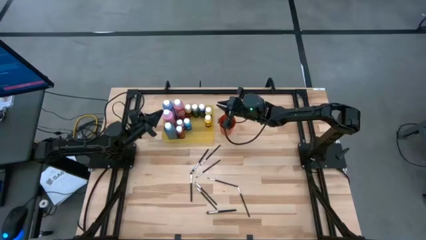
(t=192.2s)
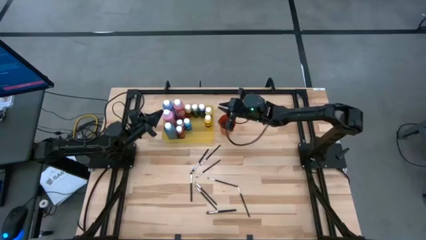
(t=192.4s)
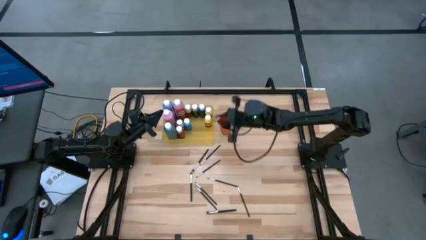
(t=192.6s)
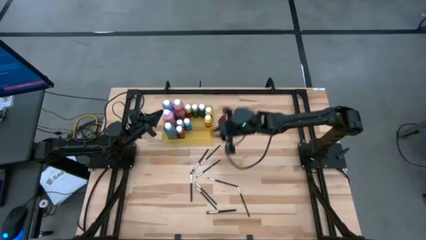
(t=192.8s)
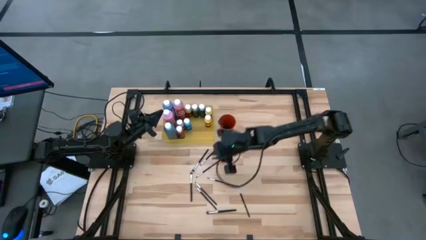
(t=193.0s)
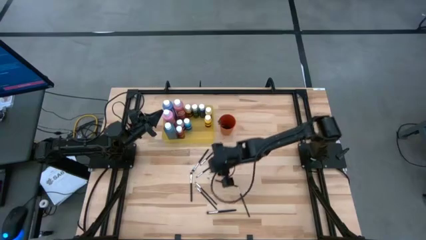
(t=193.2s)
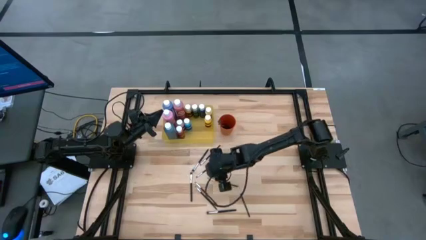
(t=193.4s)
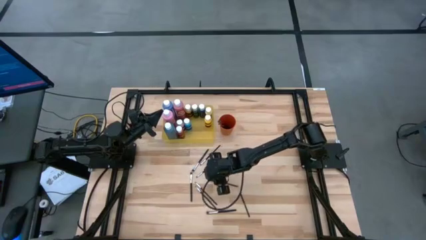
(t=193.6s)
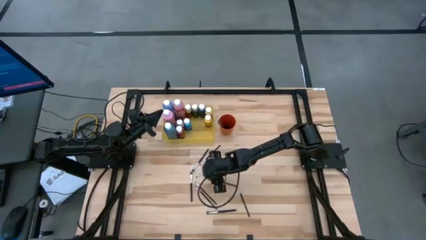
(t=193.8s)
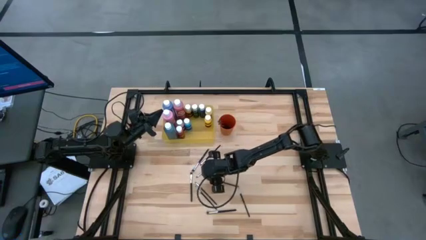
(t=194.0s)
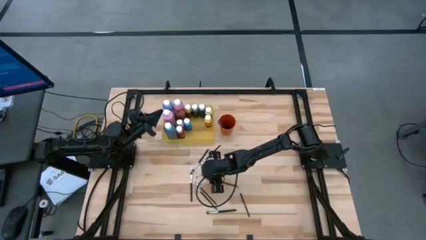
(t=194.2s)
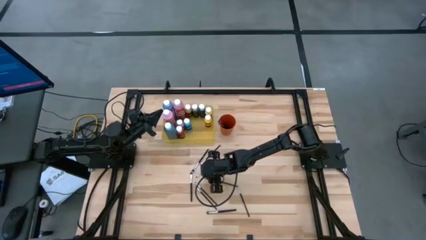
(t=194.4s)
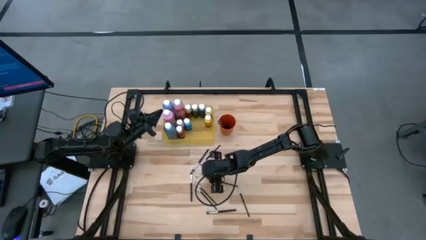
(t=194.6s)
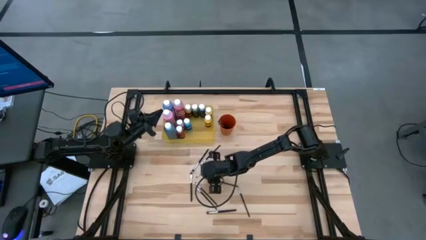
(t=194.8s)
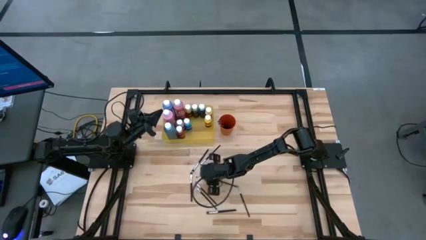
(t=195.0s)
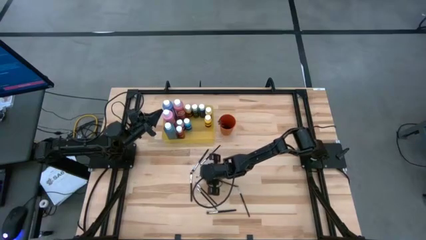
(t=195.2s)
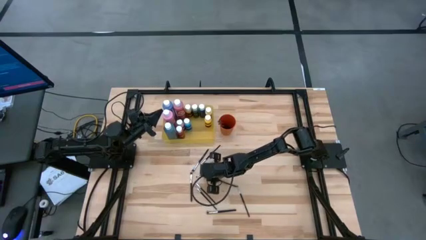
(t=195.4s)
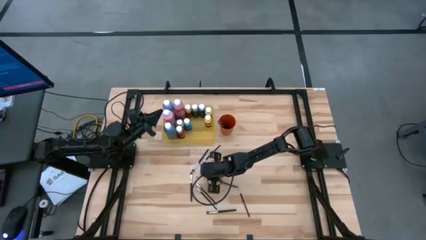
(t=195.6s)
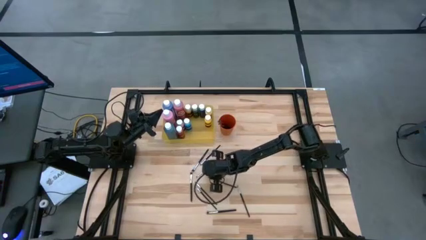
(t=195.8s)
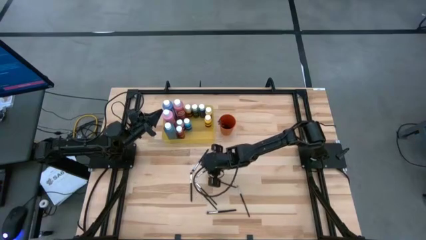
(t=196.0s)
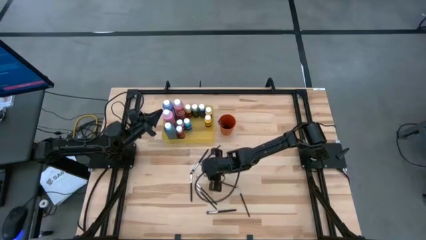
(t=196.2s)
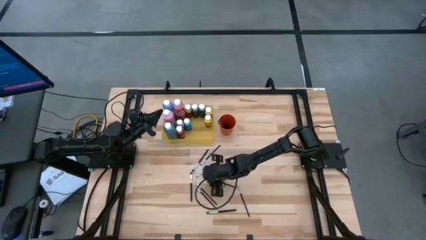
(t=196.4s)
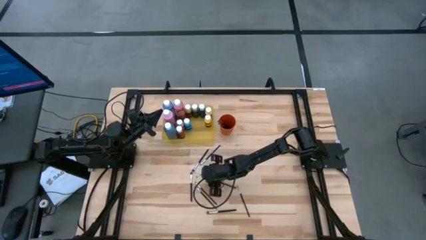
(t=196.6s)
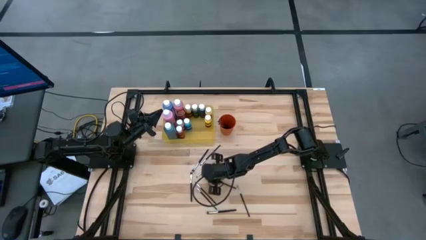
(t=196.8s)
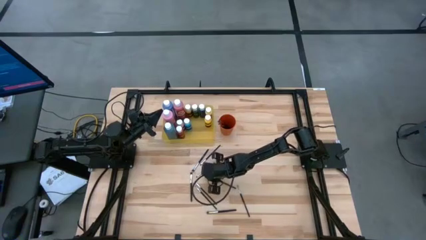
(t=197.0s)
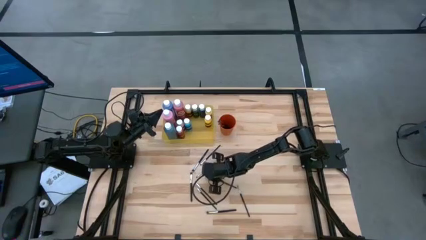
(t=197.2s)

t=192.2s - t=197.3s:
Task: Pick & Place Paint Supplies
Put the silver paint brush into the orange cup

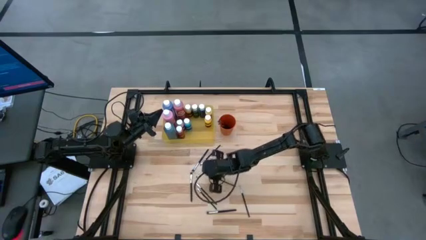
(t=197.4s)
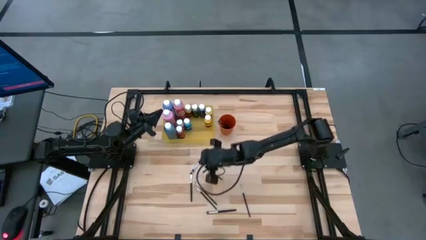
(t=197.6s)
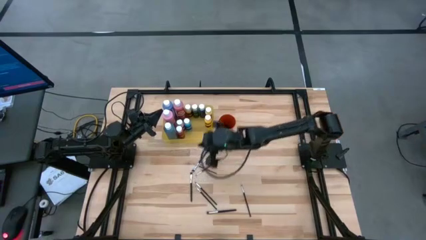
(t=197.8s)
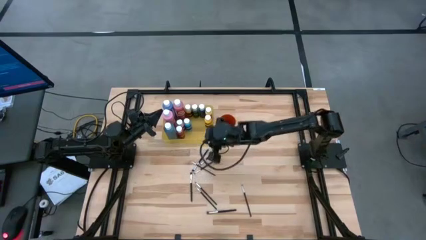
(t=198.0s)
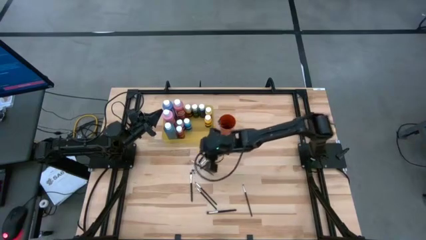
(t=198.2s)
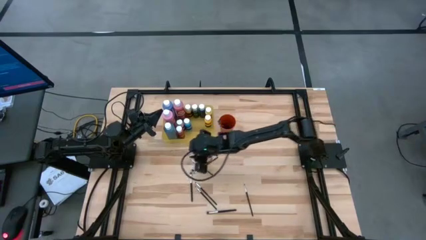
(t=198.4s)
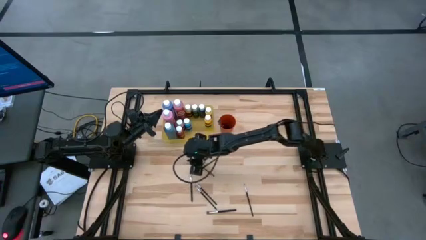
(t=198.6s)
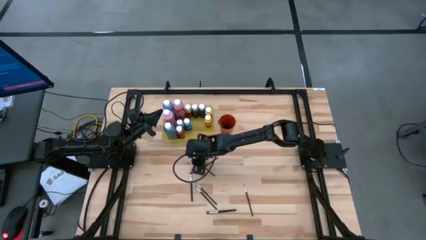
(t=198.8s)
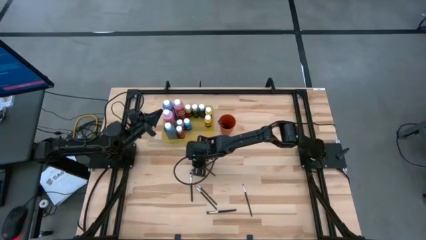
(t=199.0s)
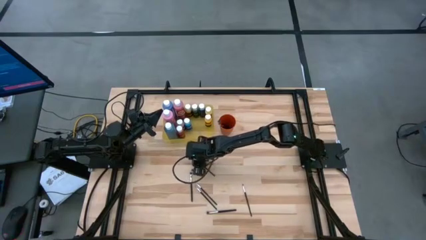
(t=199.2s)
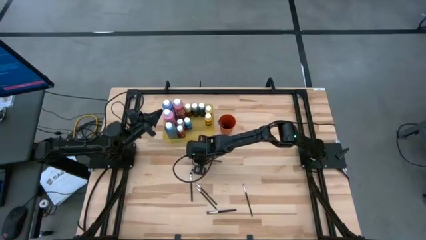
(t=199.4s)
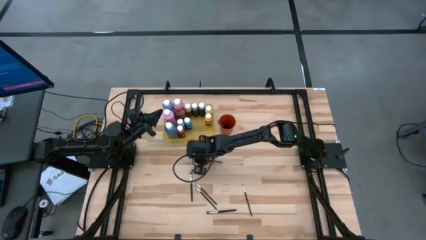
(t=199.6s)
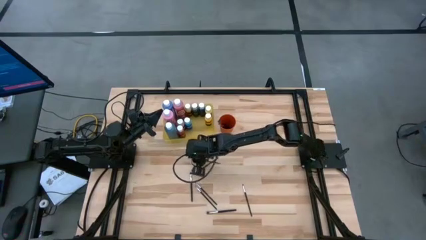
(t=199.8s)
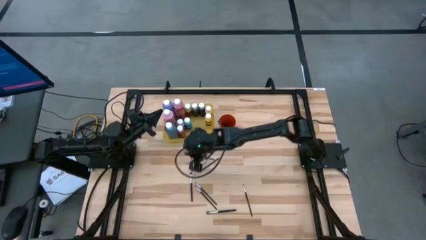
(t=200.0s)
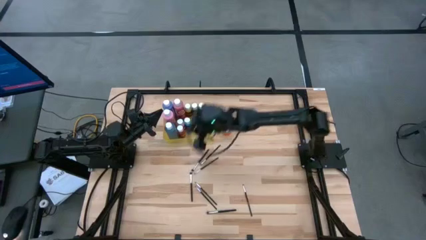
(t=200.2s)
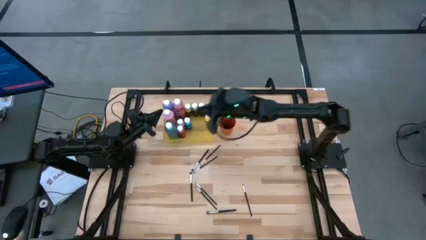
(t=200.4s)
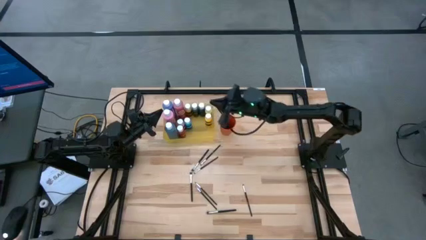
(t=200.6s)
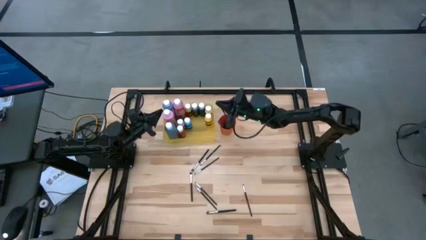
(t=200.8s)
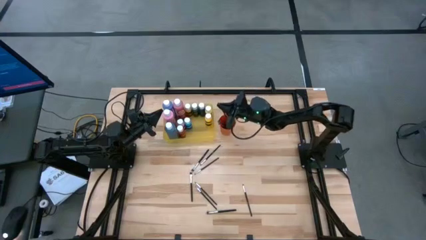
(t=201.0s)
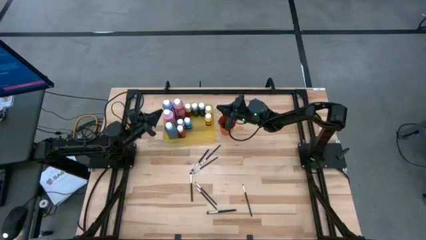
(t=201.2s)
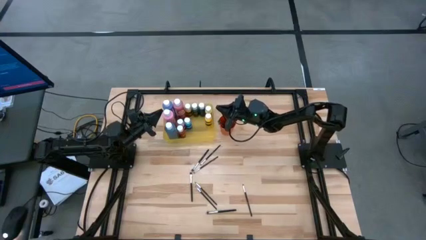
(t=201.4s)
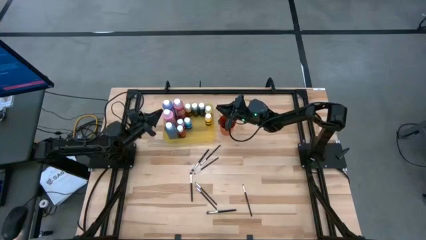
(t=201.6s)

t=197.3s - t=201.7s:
Put the silver paint brush into the orange cup

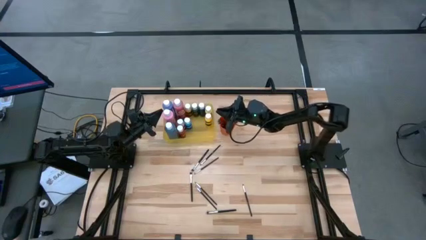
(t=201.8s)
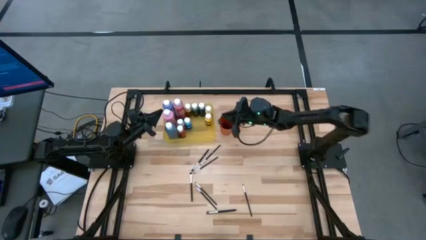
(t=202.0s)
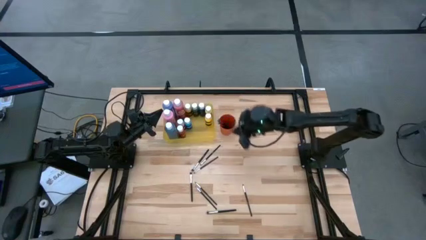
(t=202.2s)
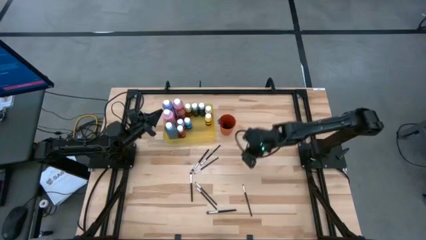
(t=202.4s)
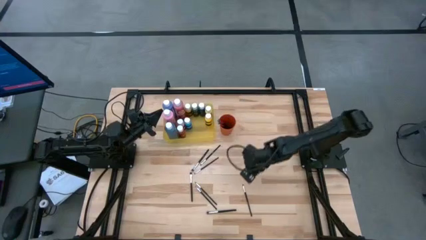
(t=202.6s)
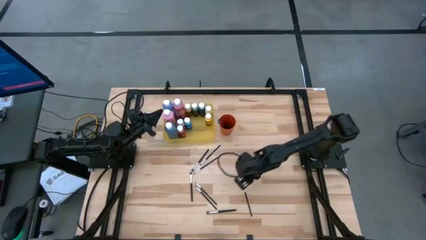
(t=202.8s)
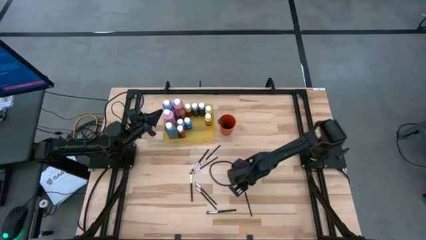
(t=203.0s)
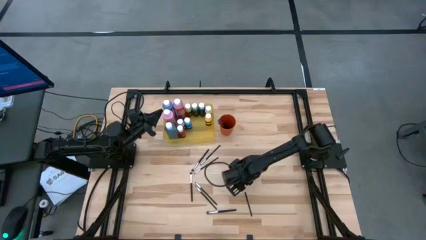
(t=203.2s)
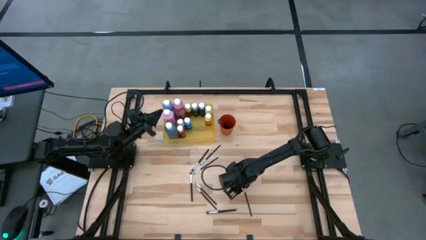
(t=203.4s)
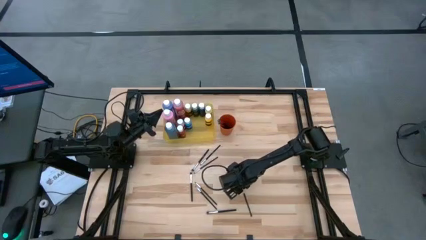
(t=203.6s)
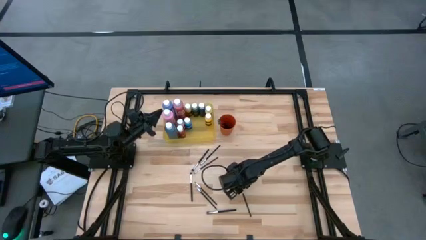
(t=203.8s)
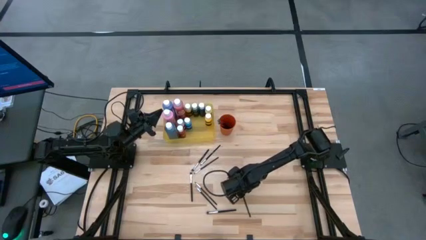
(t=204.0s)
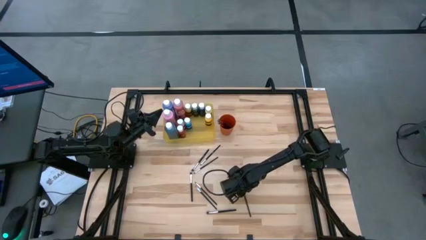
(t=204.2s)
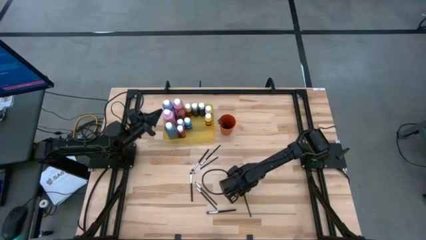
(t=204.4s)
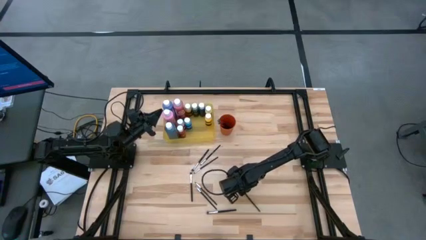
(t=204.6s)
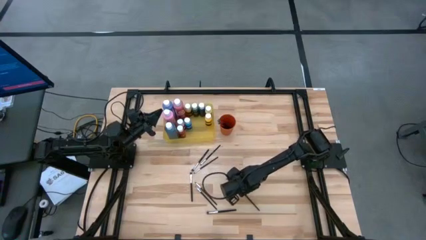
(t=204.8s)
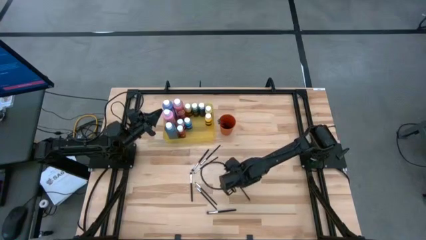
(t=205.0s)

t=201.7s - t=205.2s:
Put the silver paint brush into the orange cup

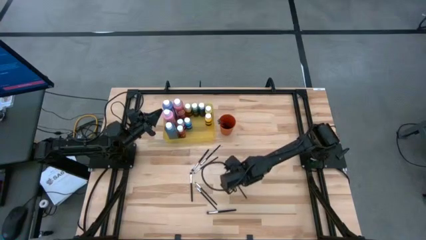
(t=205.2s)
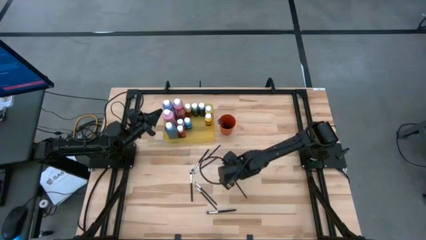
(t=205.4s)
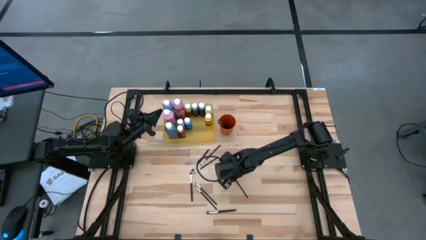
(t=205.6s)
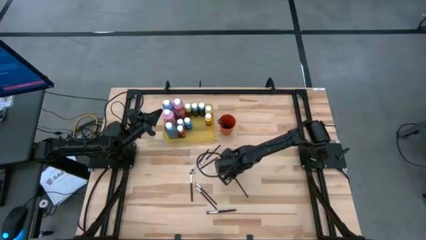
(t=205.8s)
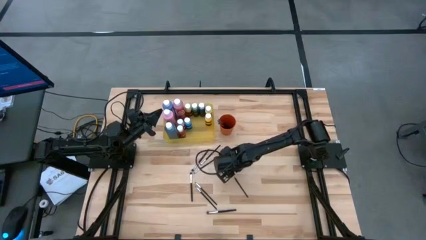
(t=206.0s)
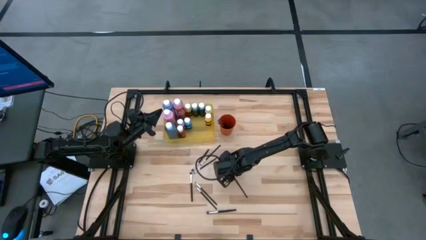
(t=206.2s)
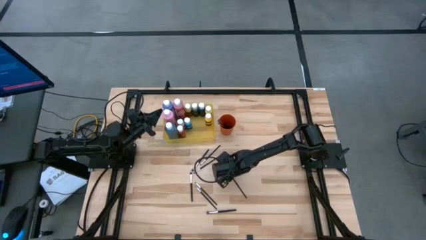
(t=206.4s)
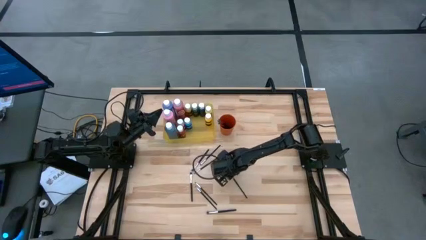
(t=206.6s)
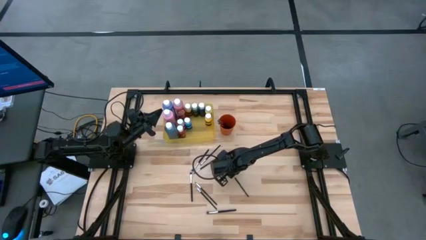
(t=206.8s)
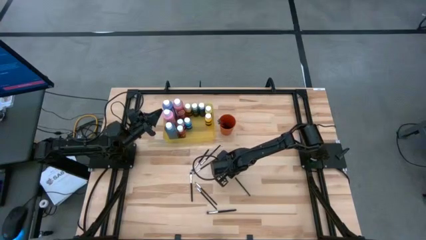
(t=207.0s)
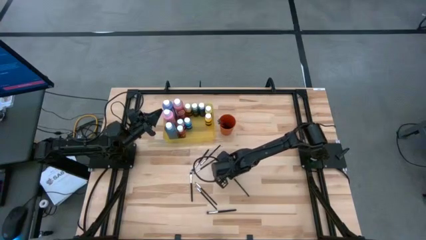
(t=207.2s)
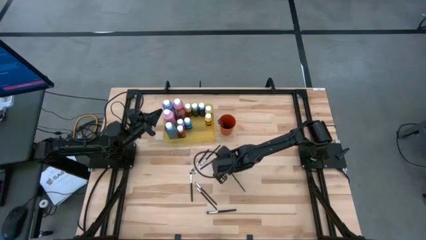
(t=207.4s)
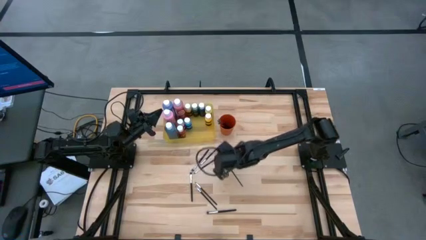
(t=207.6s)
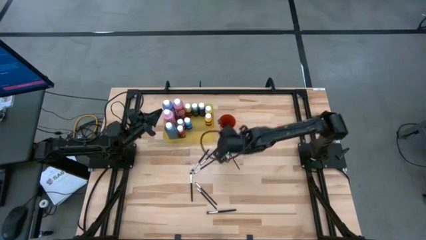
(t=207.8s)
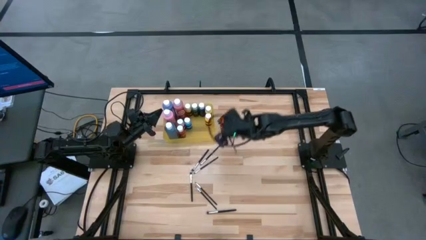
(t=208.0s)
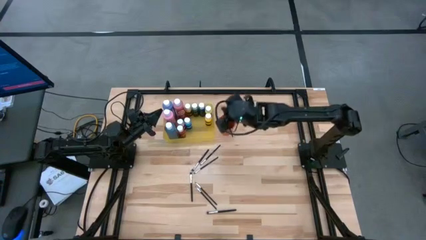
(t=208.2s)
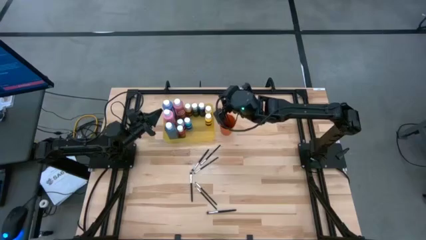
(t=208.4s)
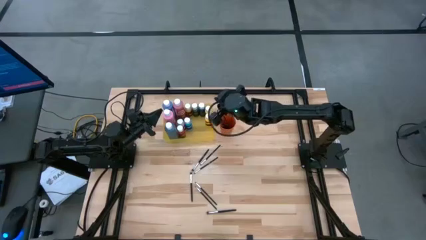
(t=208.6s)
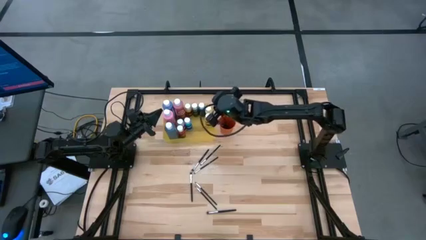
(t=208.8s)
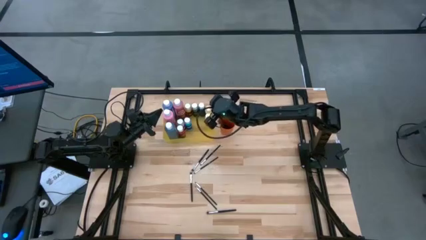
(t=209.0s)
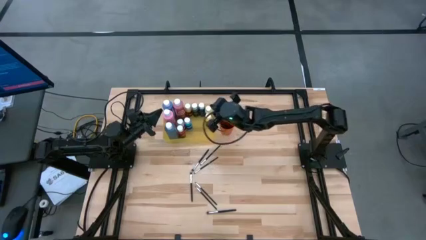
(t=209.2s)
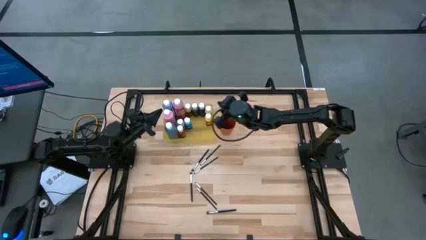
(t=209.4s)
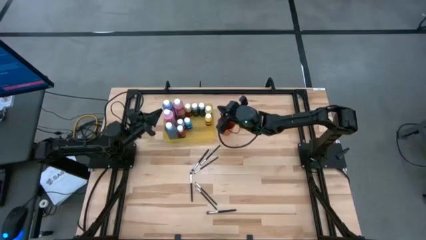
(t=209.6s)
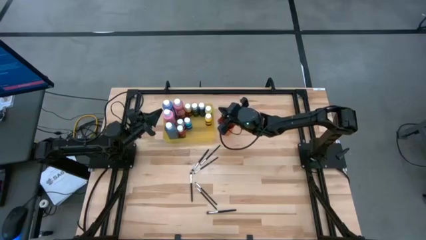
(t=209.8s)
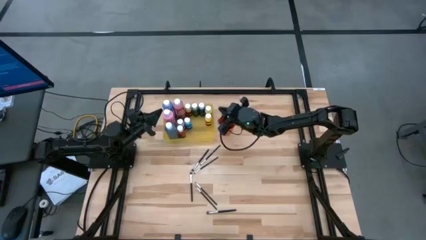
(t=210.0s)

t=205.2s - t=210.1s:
Put the silver paint brush into the orange cup
